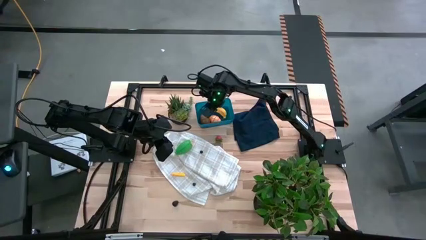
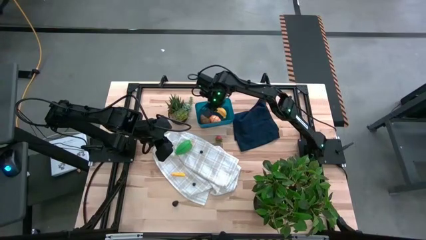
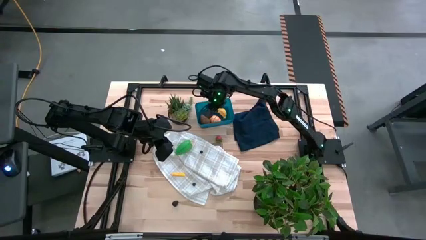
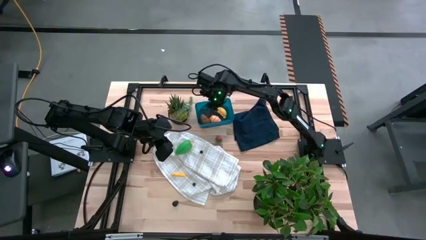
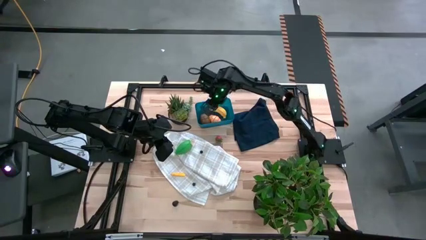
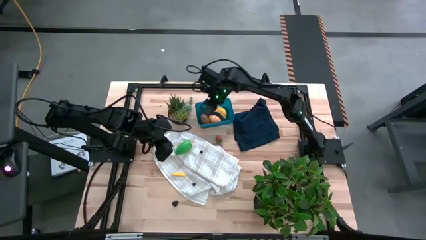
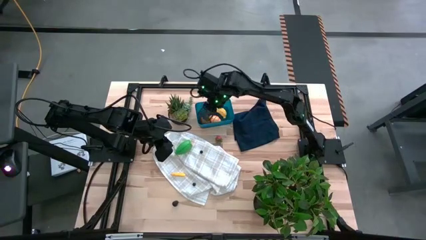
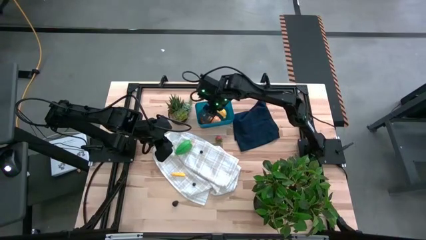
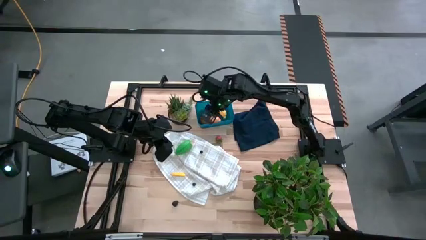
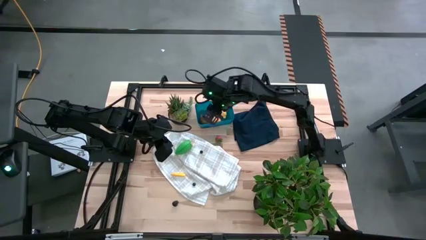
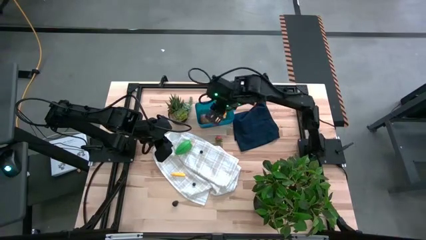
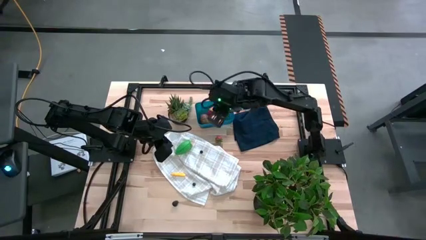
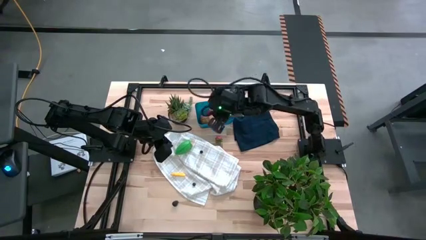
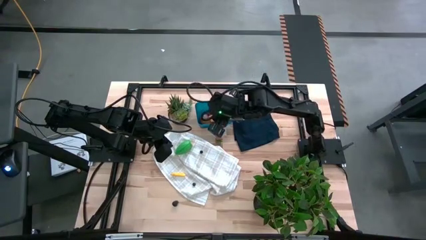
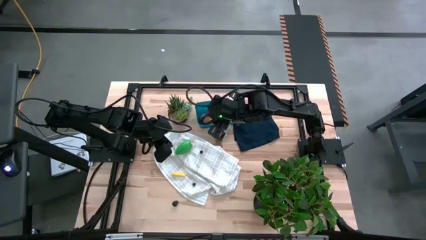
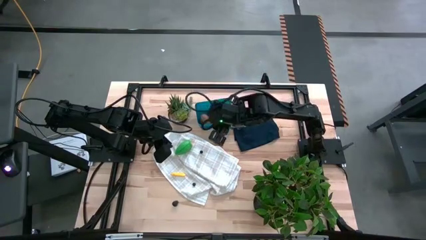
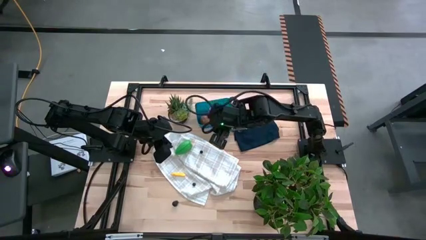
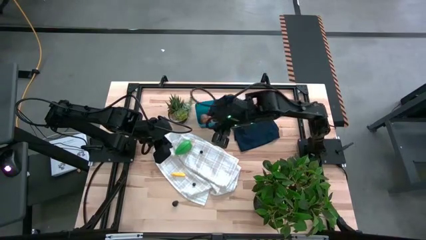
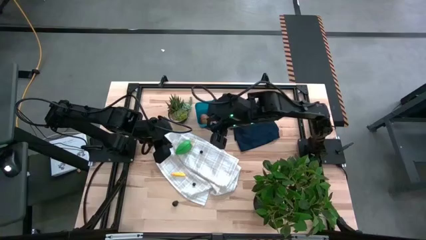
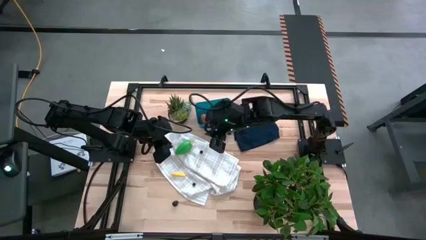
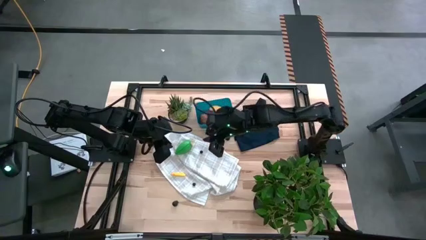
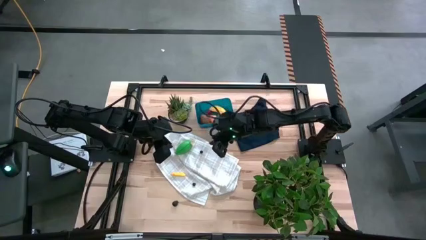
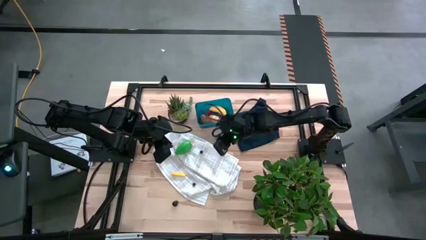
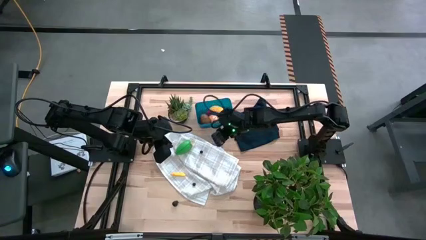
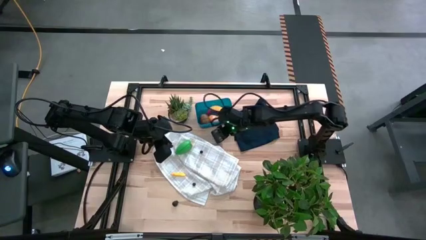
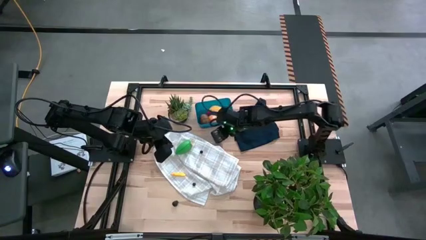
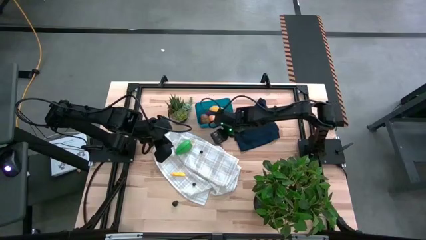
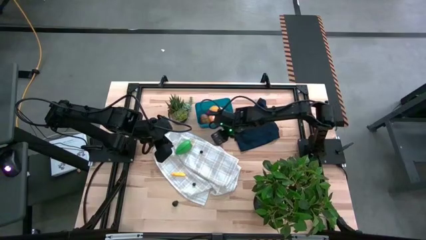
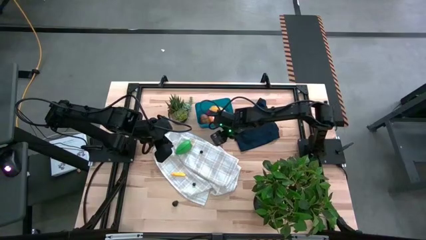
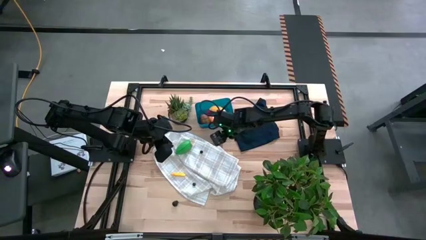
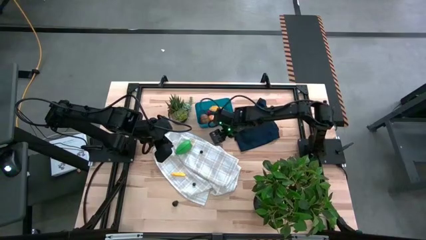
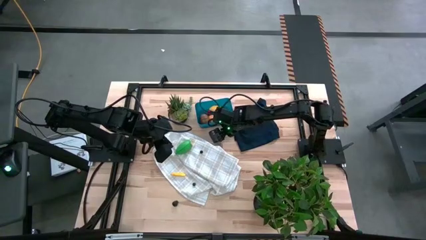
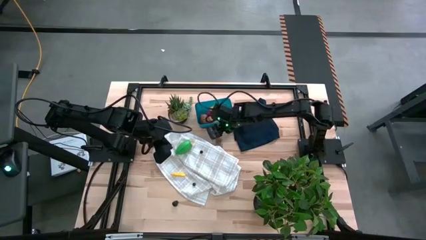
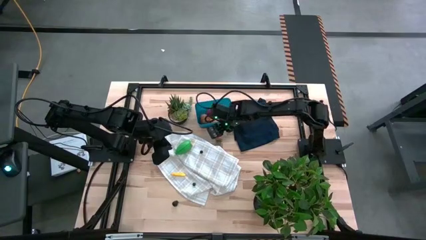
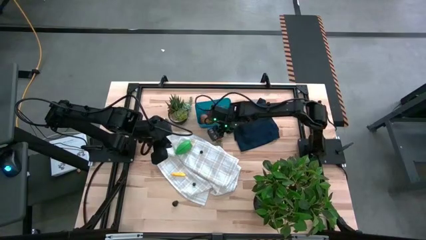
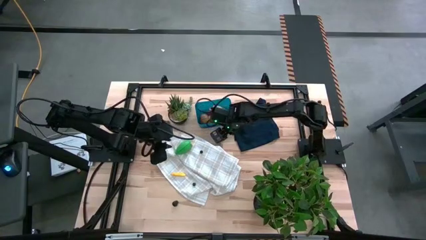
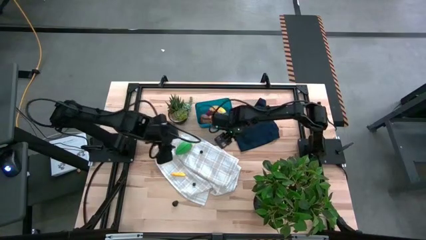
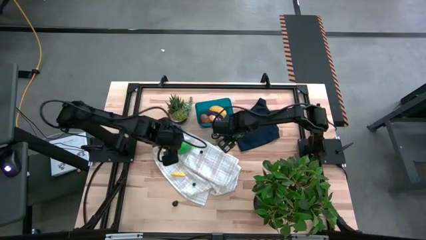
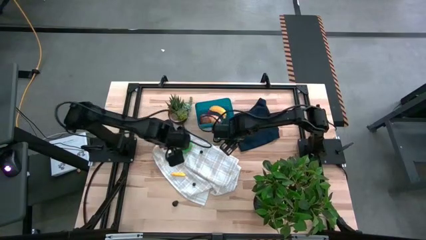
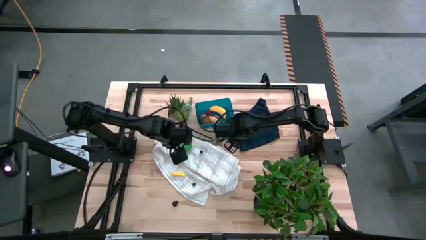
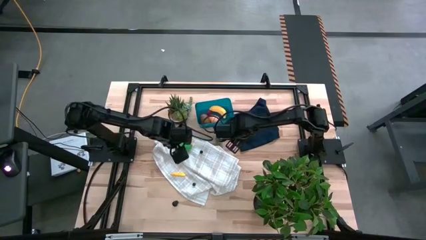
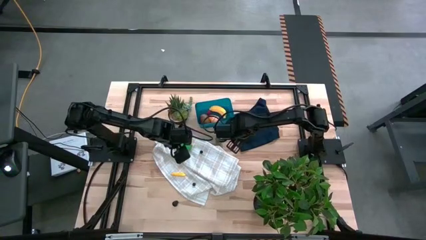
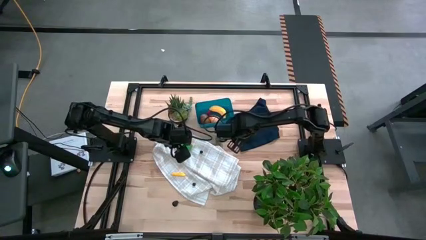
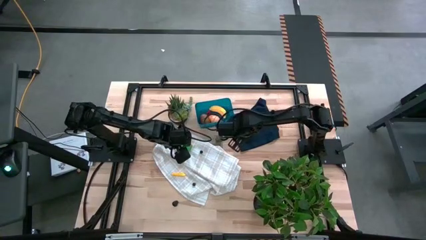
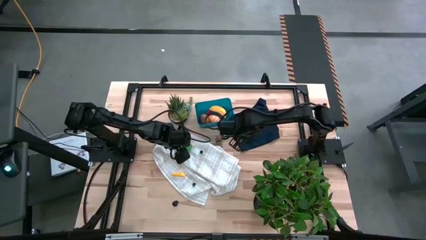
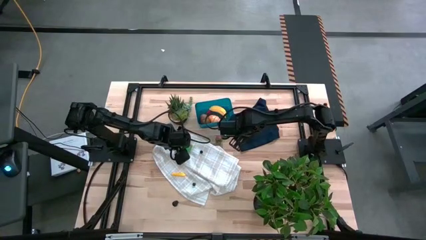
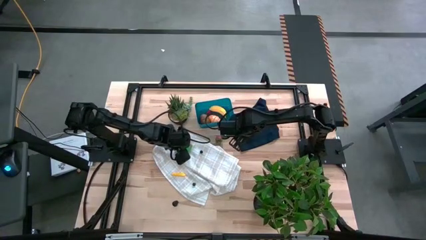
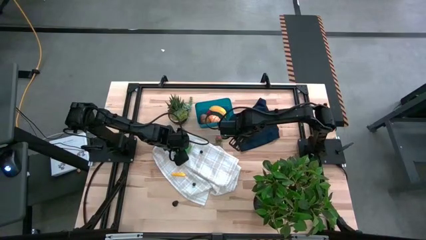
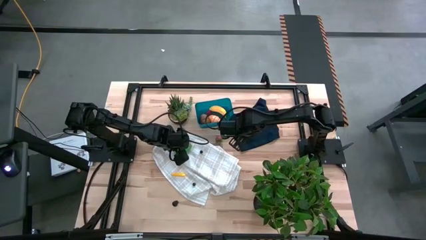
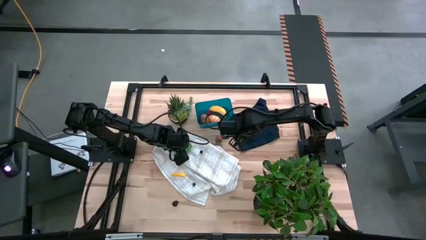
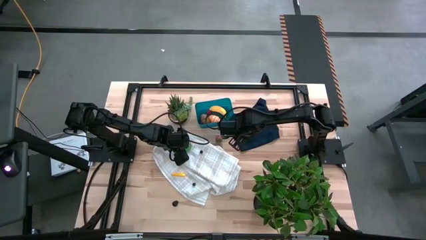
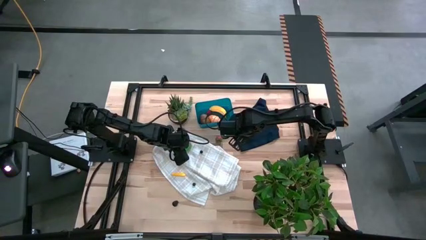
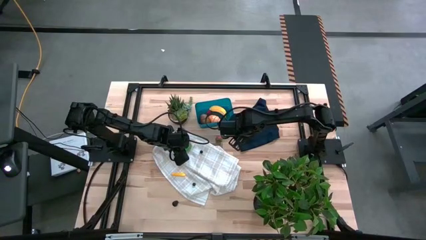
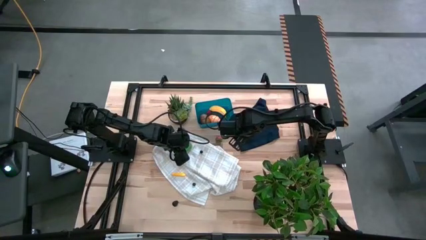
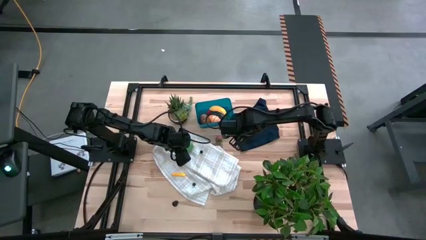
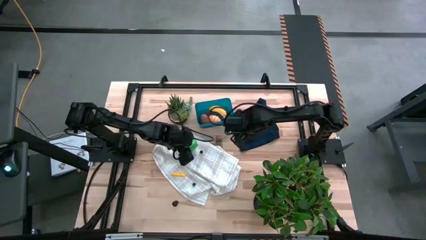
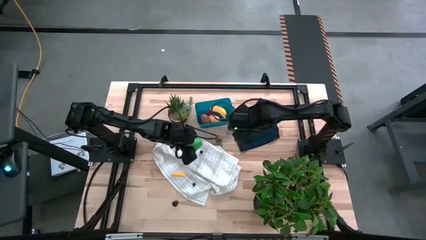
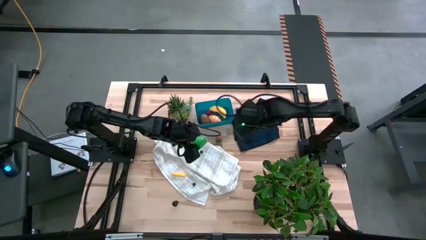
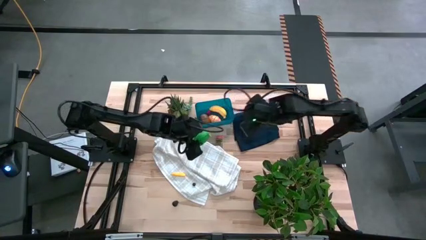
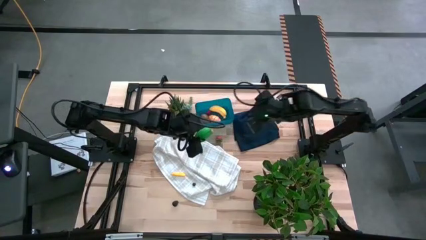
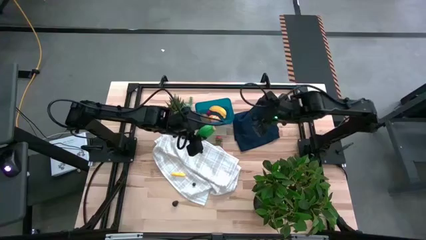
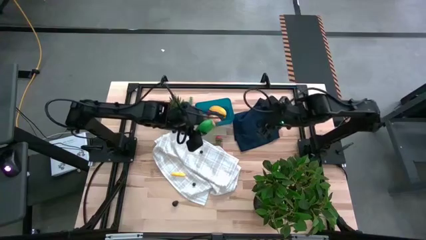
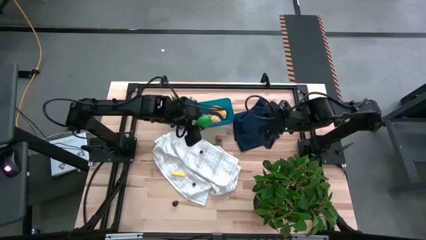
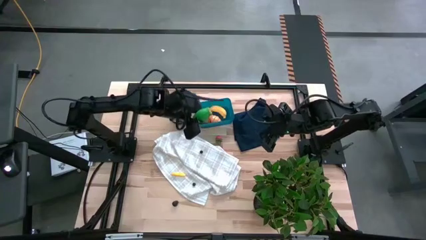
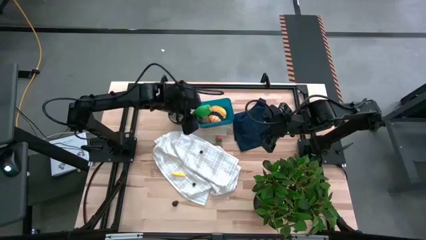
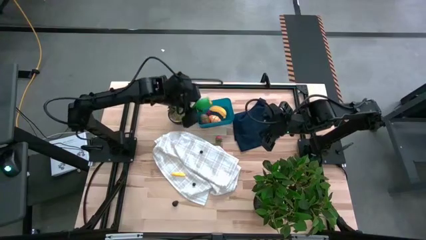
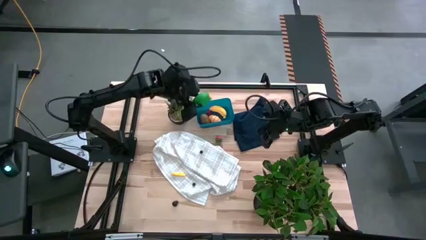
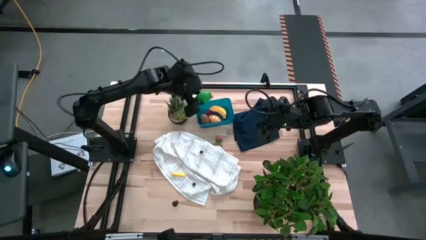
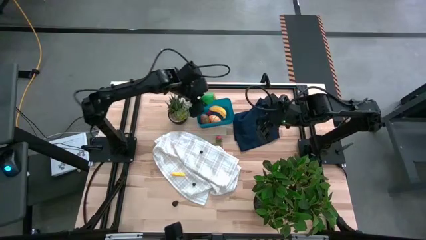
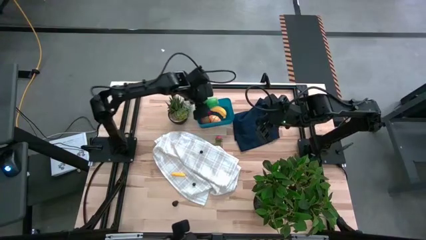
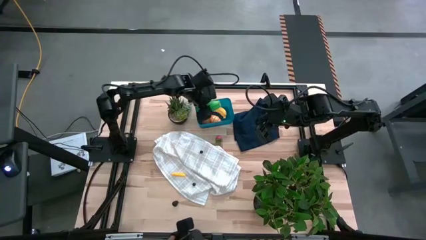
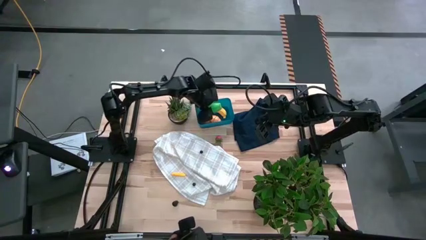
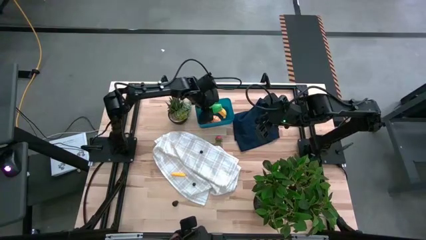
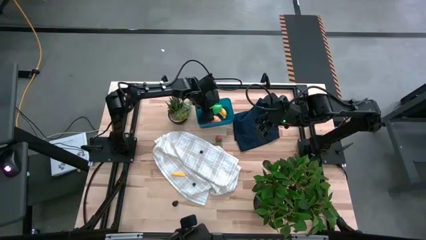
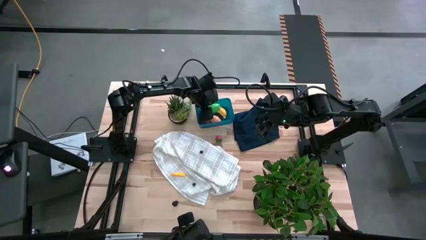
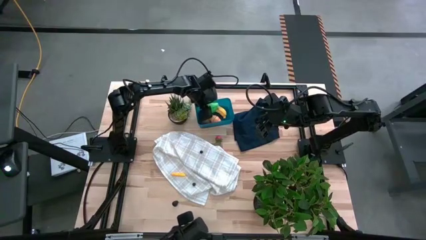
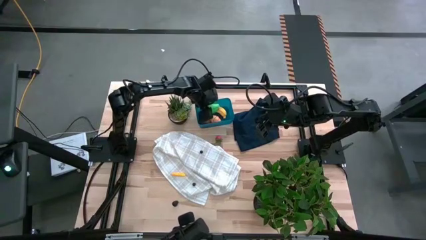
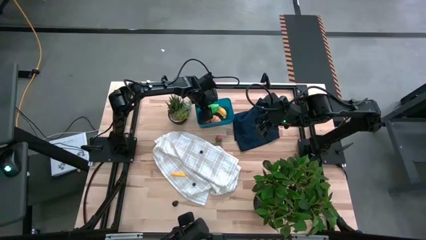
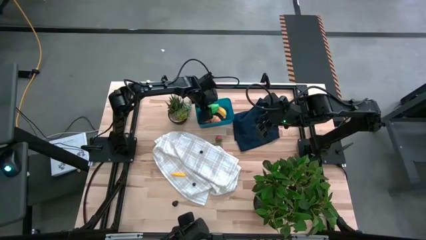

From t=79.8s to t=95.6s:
Task: Pick and placing Produce into tupperware
Put the green corn into the blue bin
